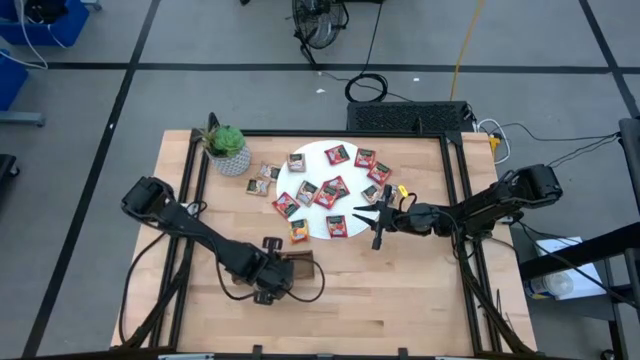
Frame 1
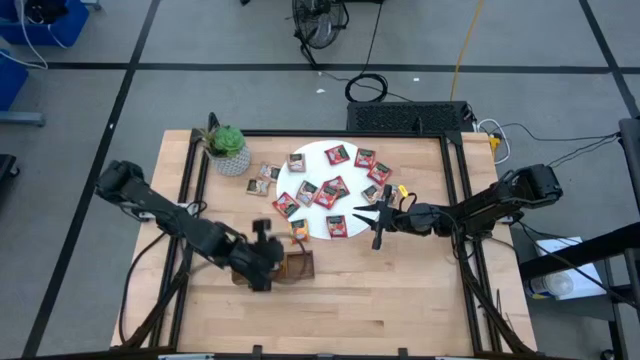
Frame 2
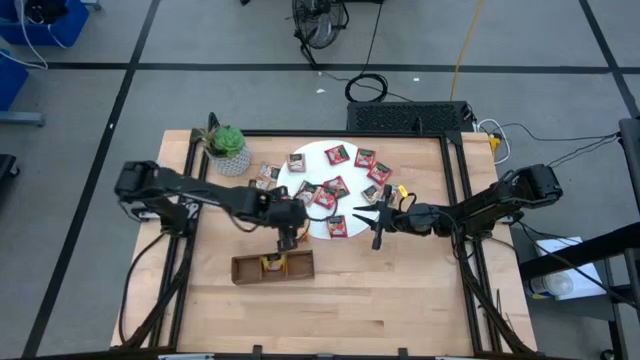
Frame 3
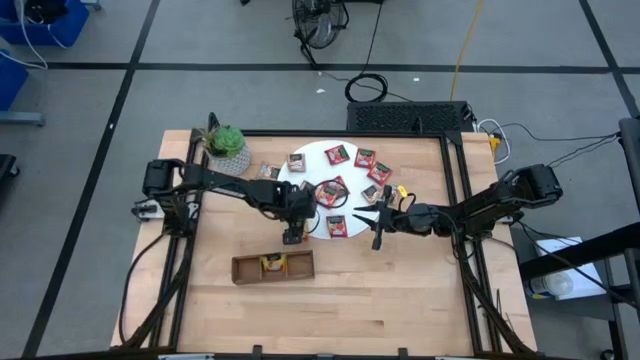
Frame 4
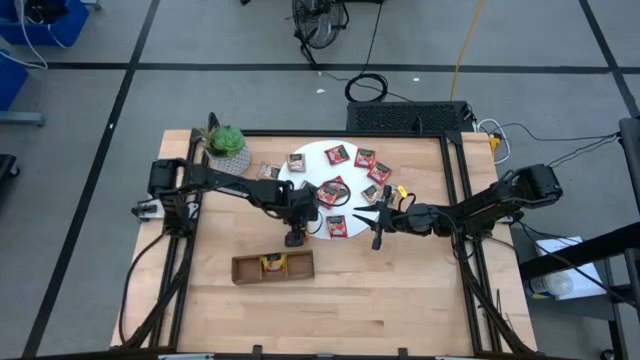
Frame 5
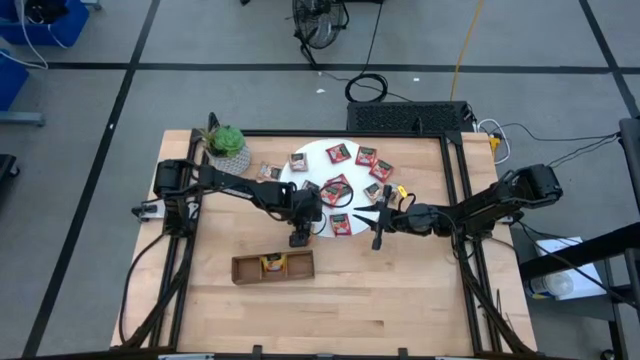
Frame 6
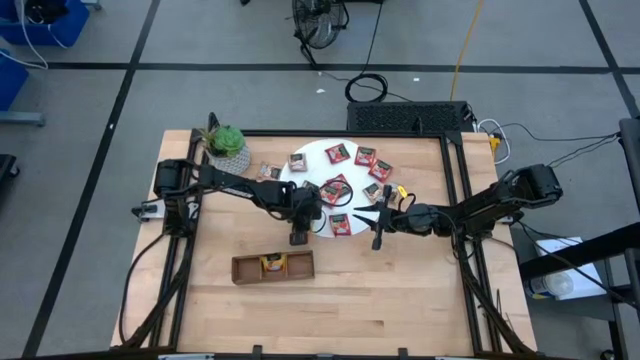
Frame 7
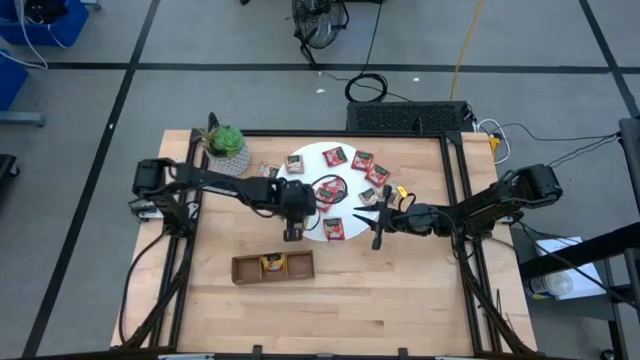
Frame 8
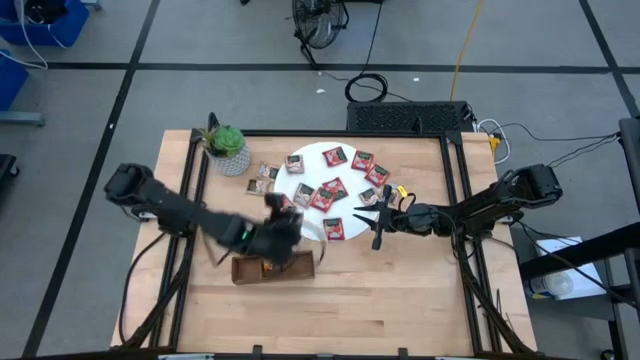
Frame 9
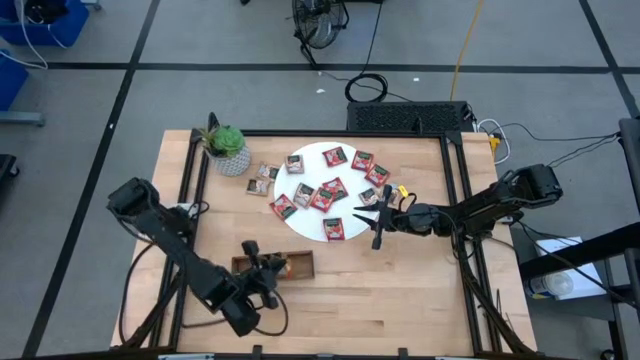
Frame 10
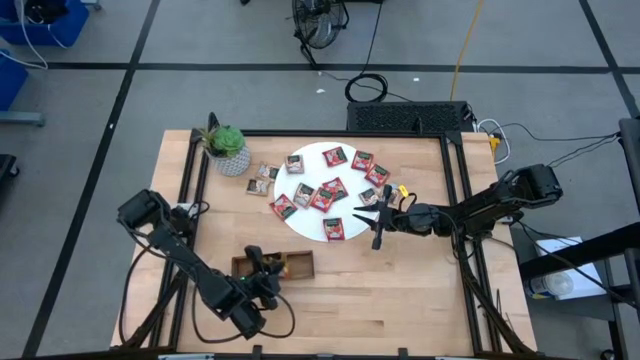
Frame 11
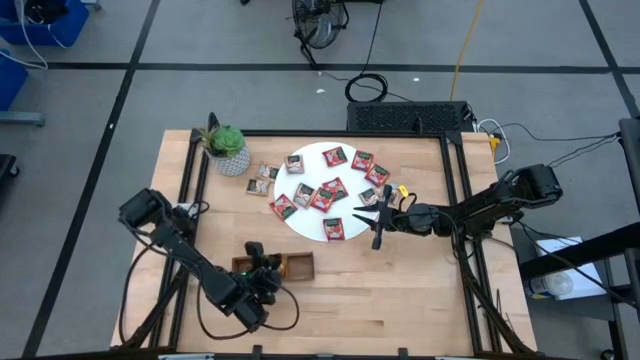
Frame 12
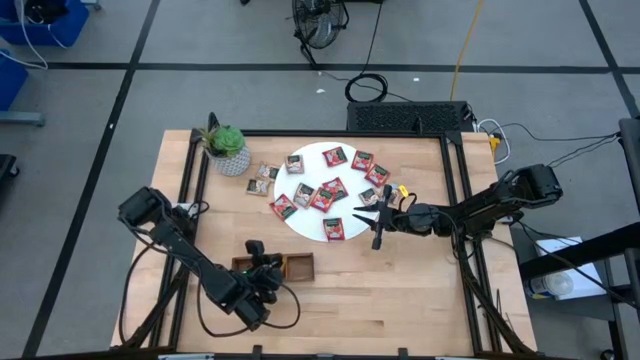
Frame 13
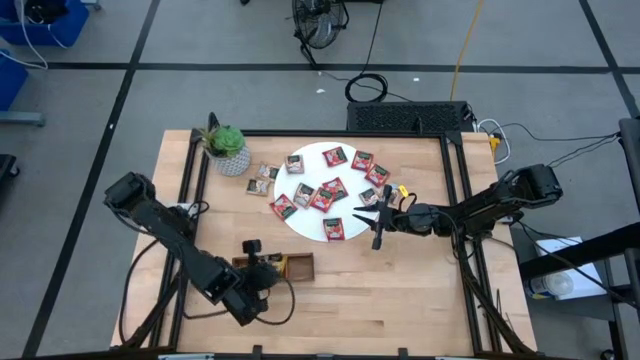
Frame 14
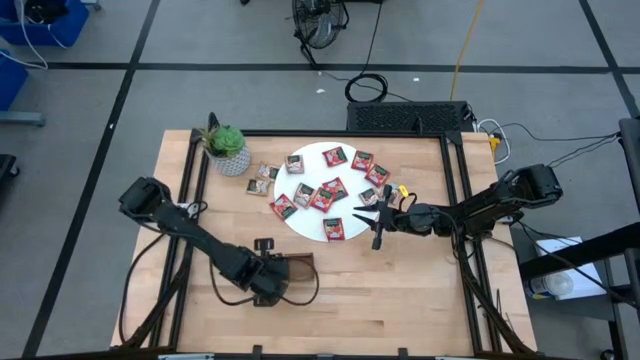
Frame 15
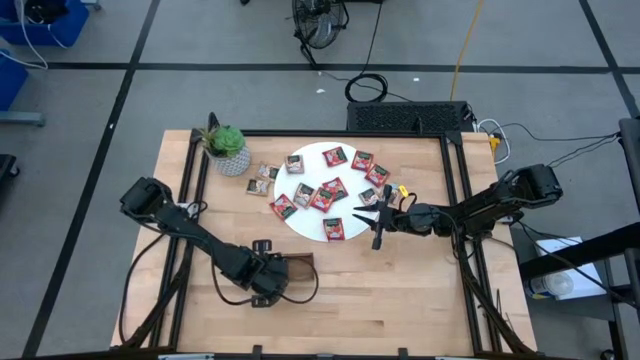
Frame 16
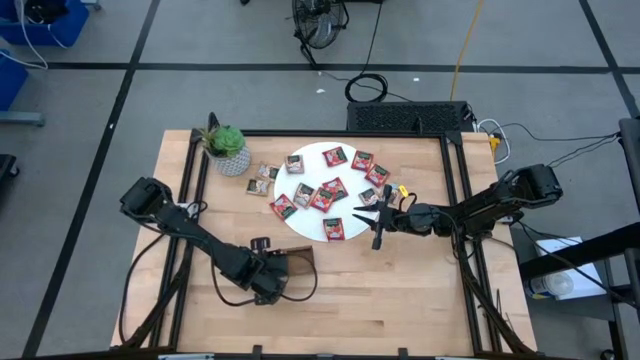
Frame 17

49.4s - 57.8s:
Task: Pick & Place Tea
Put the orange tea bag into the middle section of the wooden organizer

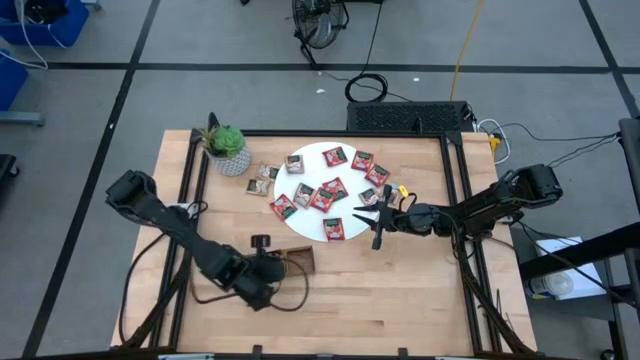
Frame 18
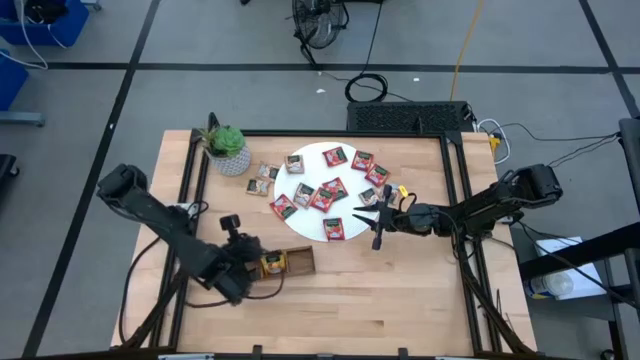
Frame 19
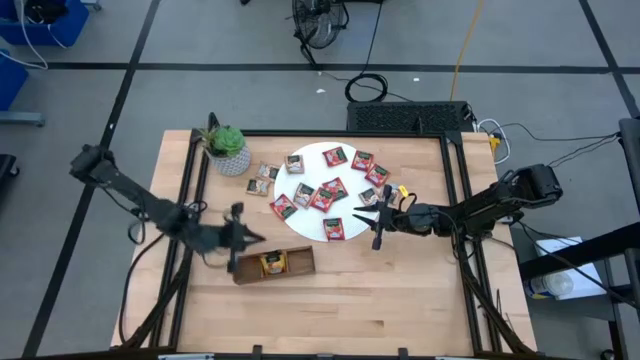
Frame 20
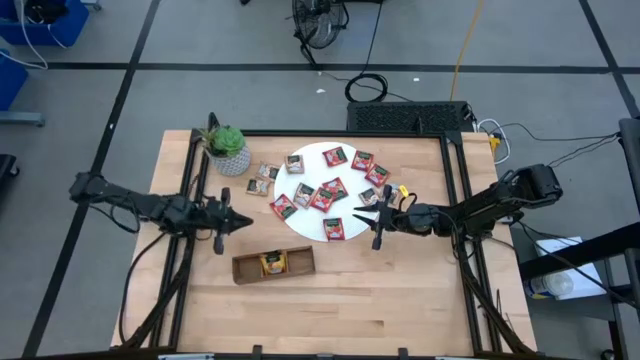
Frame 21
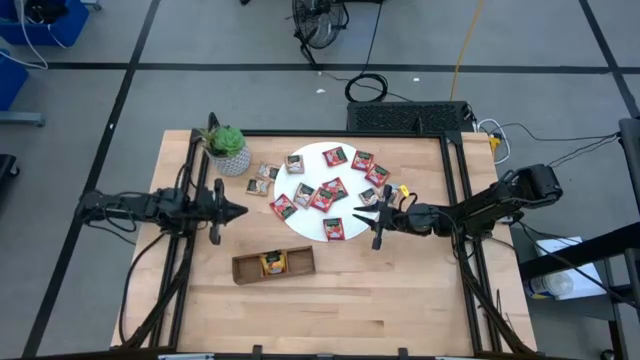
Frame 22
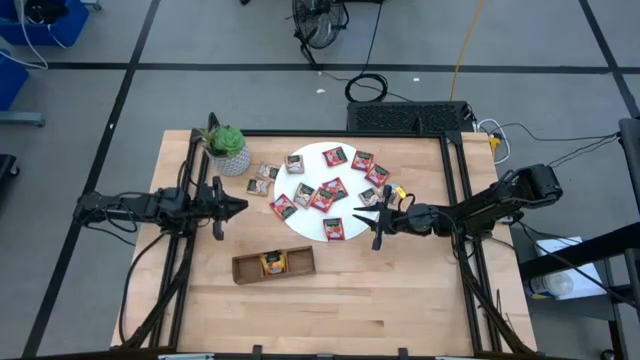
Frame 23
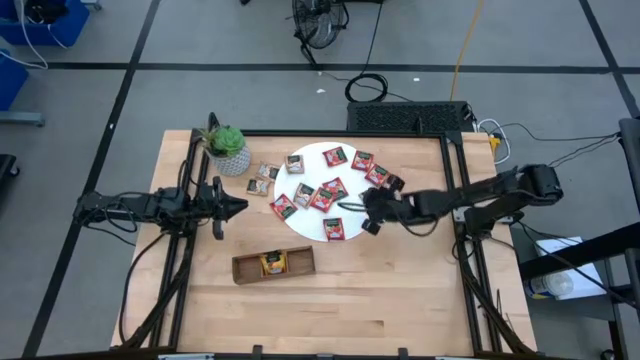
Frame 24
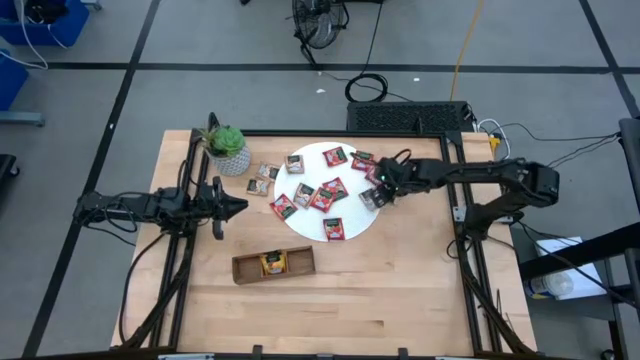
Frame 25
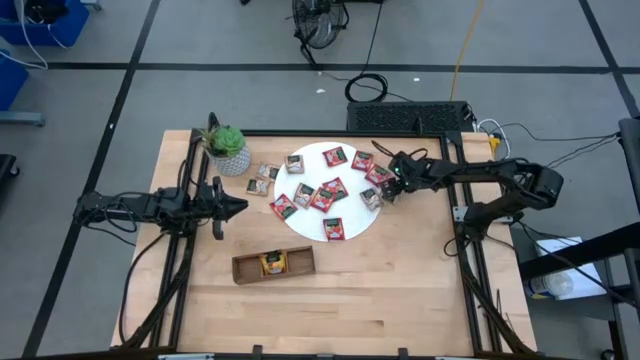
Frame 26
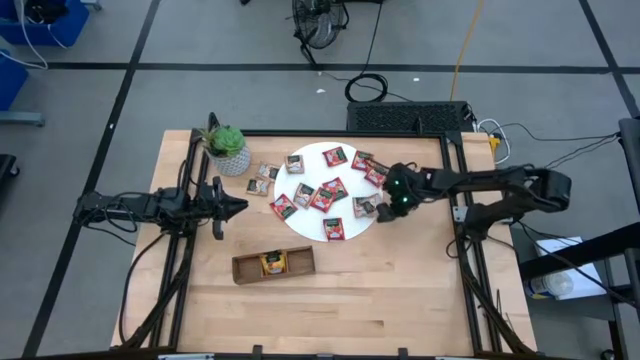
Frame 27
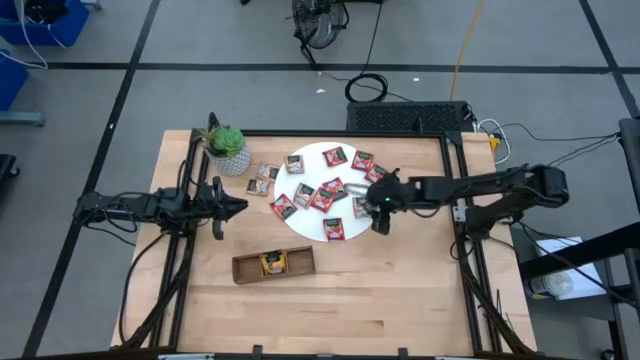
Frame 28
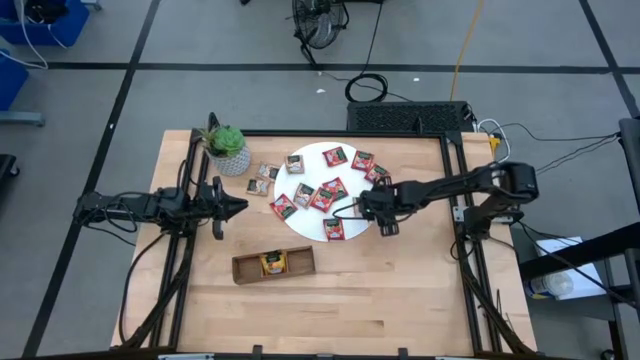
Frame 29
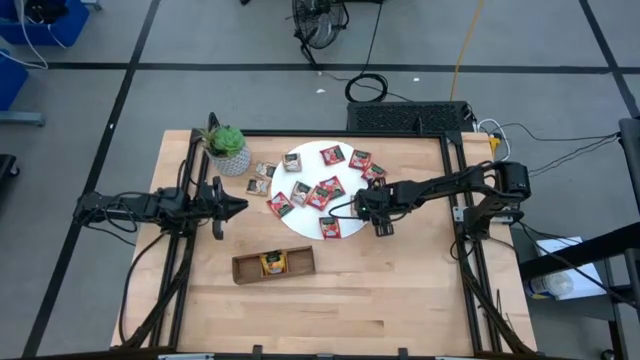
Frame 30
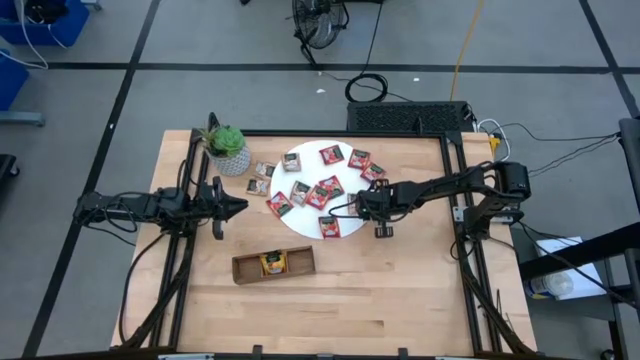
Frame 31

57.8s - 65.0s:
Put the brown tea bag into the right section of the wooden organizer

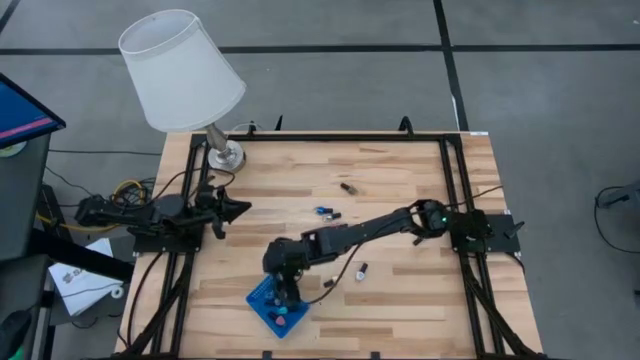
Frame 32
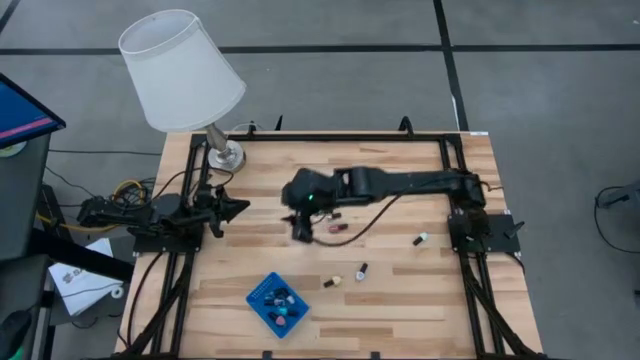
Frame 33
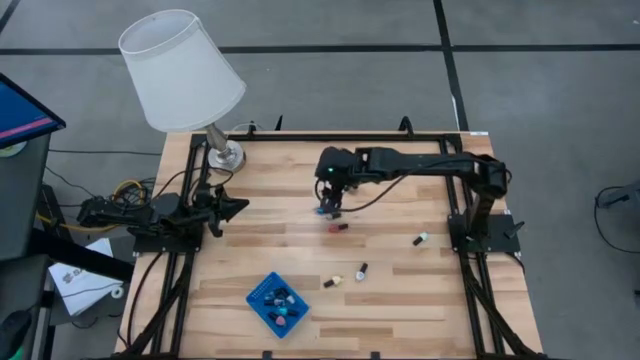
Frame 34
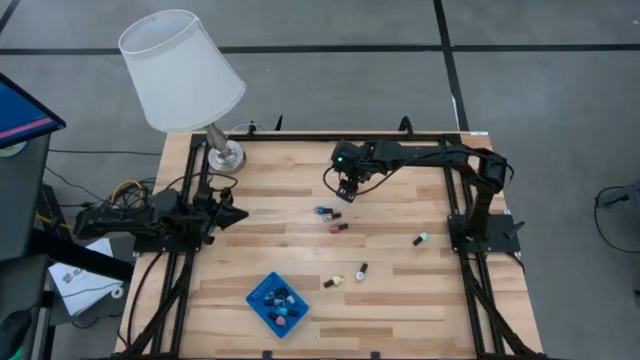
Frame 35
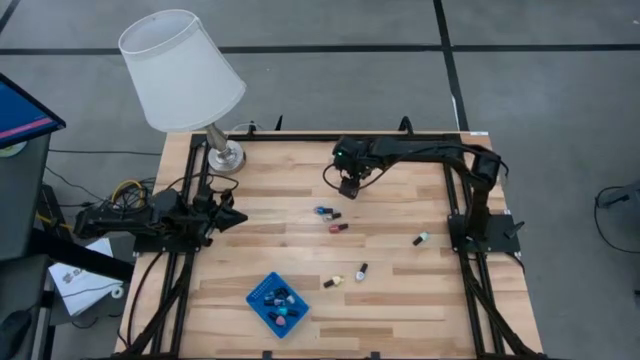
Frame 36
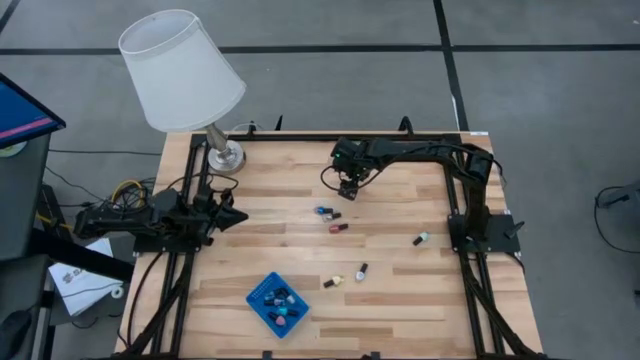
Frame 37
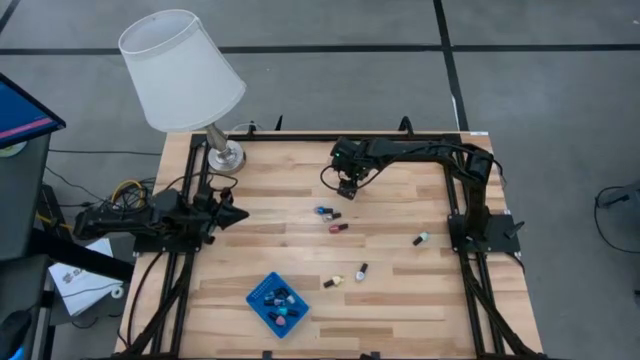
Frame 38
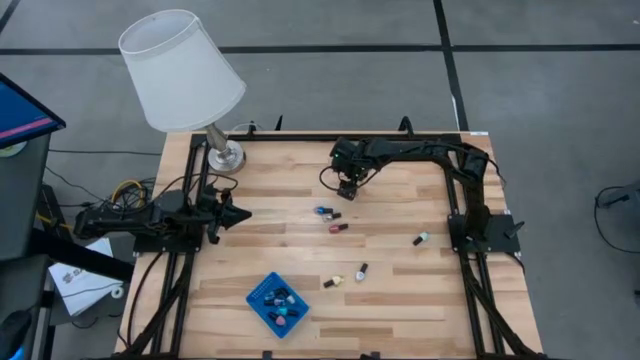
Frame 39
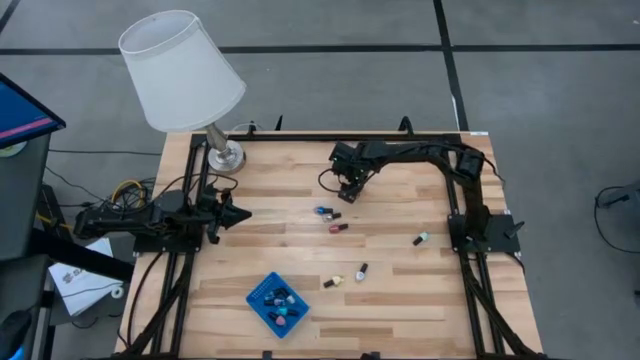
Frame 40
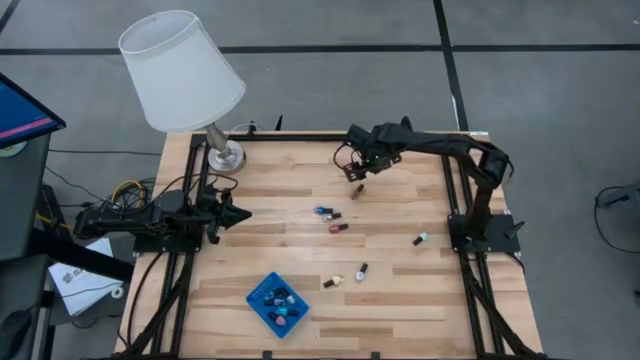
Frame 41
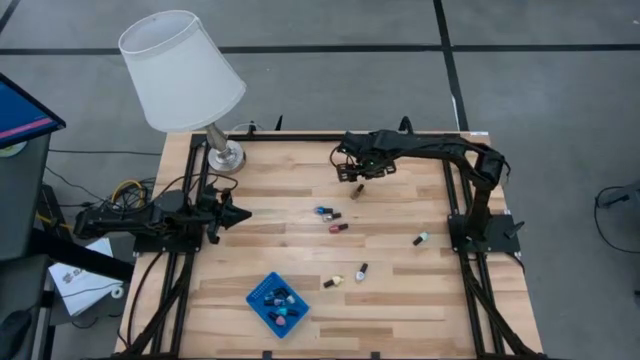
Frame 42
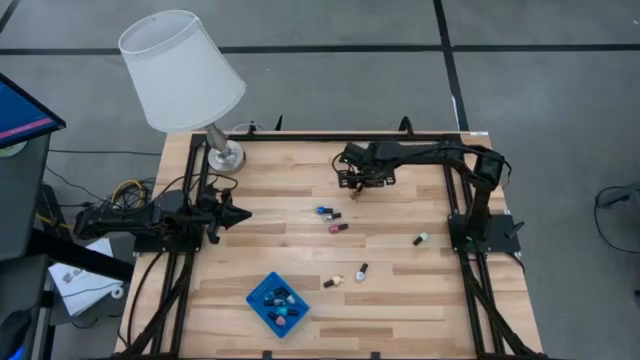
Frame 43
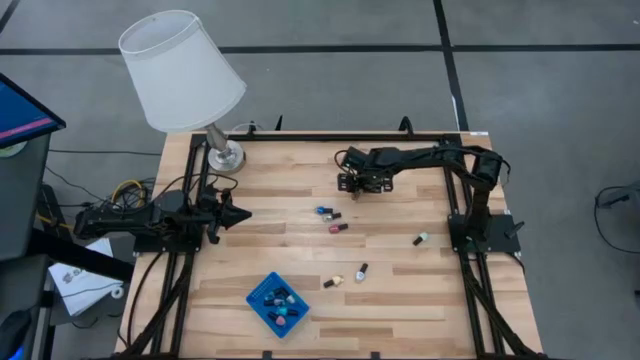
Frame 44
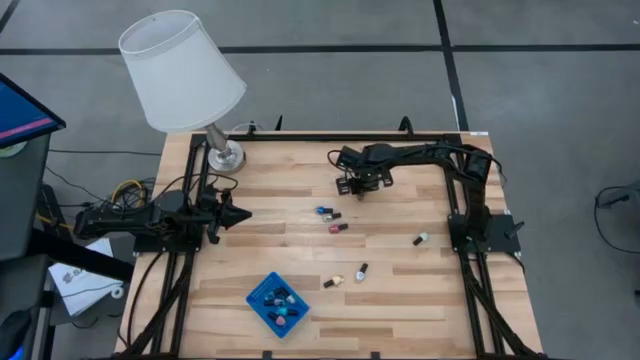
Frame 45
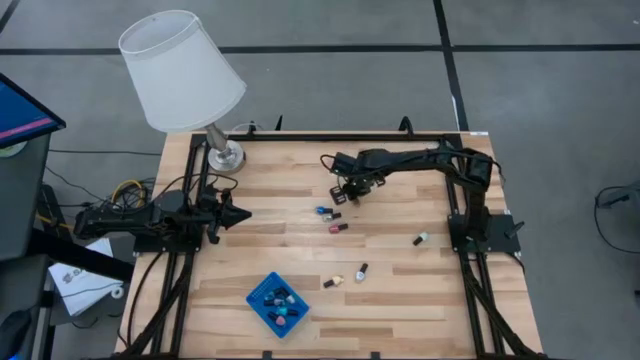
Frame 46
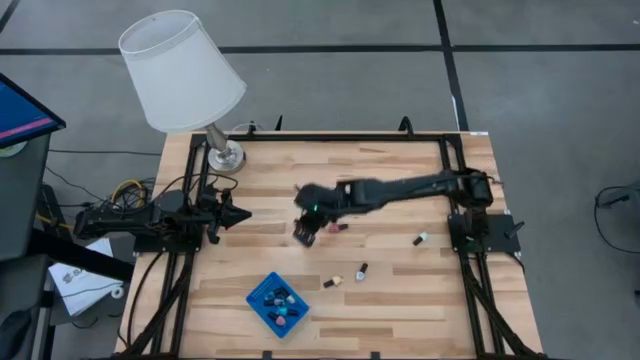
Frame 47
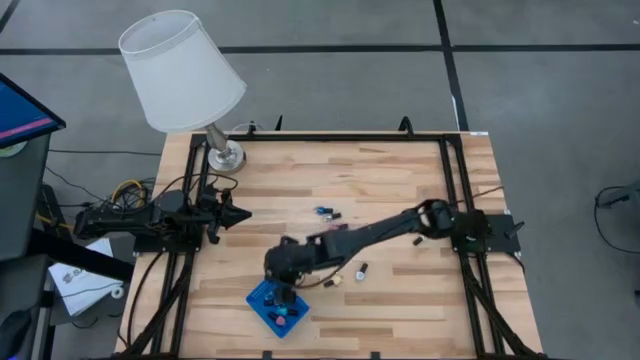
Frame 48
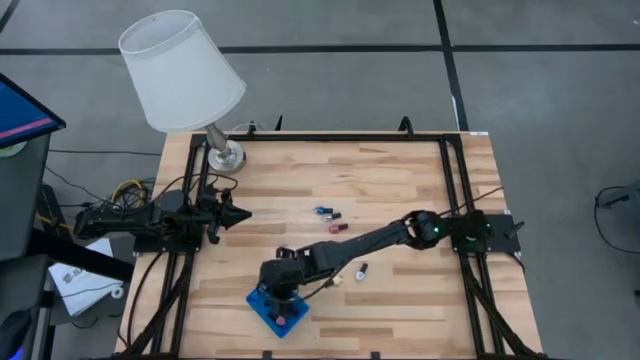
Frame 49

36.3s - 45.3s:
Task: Pick & Place Nail Polish
Put the brown nail polish bottle in the blue bin
